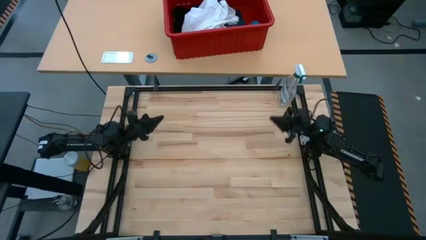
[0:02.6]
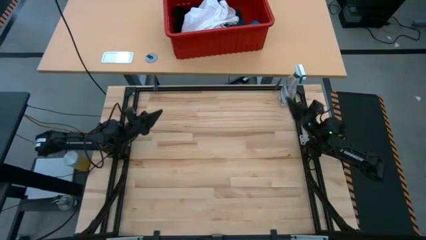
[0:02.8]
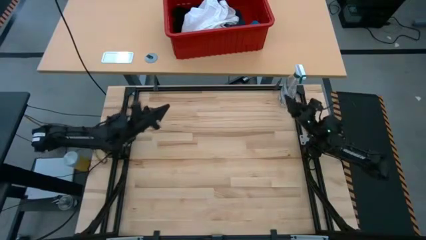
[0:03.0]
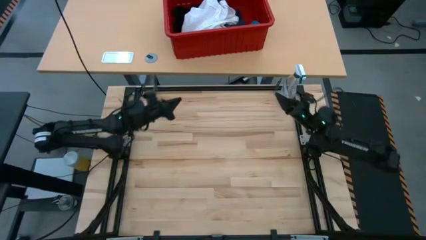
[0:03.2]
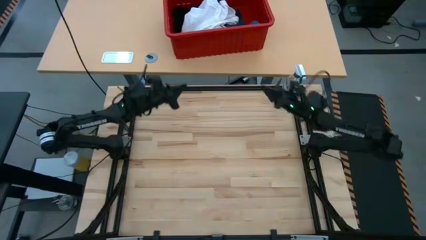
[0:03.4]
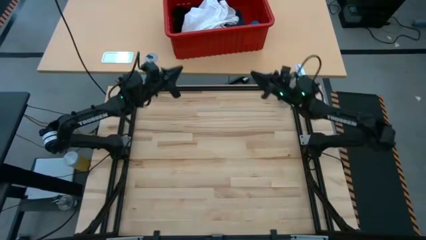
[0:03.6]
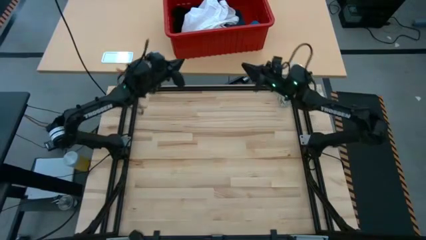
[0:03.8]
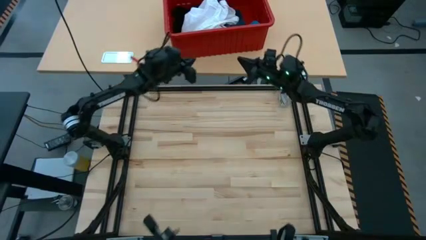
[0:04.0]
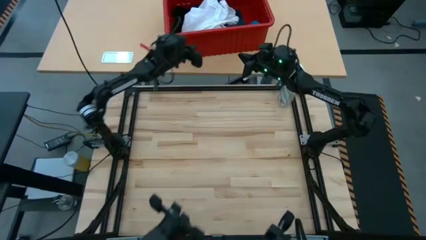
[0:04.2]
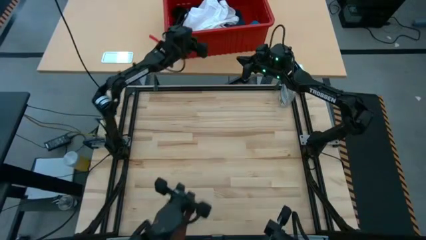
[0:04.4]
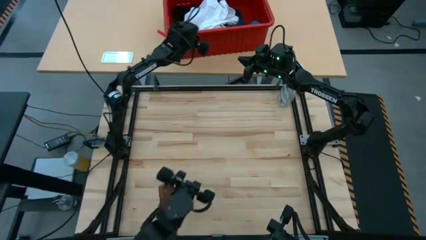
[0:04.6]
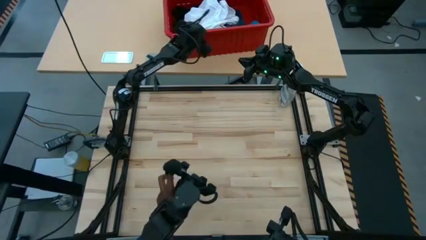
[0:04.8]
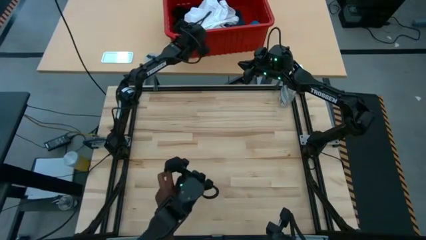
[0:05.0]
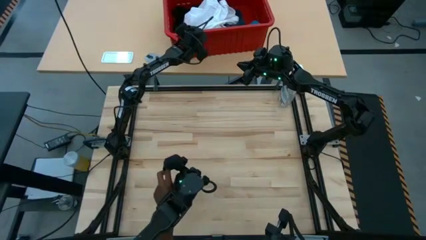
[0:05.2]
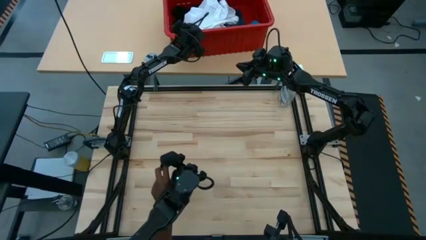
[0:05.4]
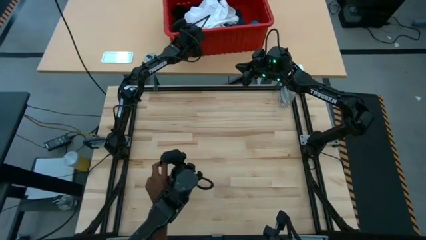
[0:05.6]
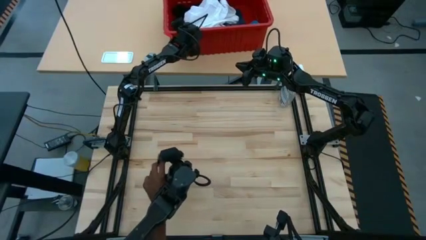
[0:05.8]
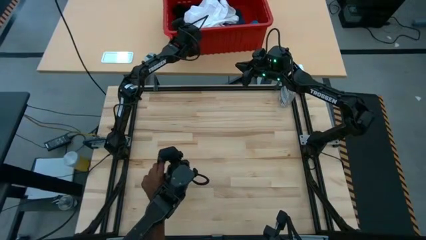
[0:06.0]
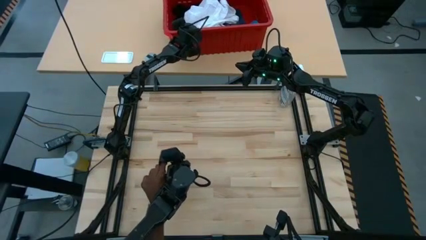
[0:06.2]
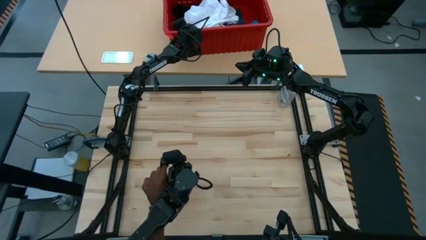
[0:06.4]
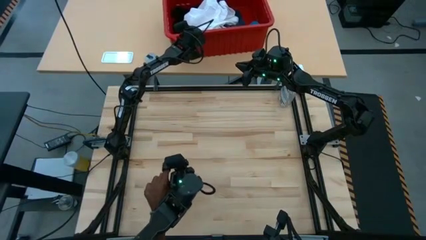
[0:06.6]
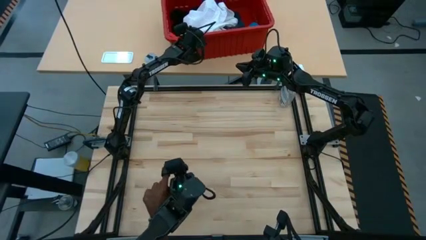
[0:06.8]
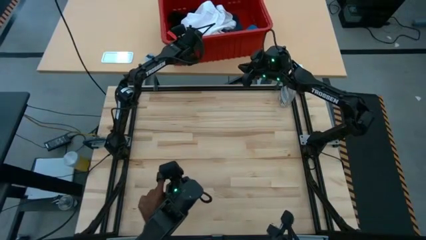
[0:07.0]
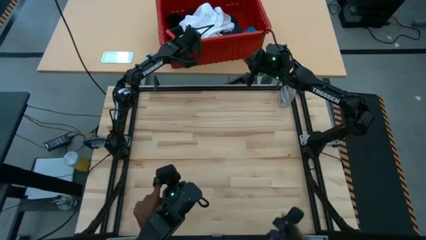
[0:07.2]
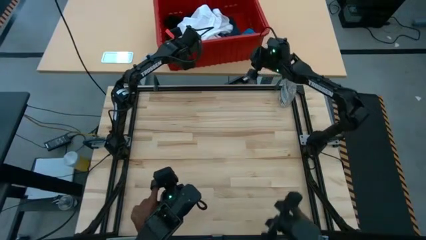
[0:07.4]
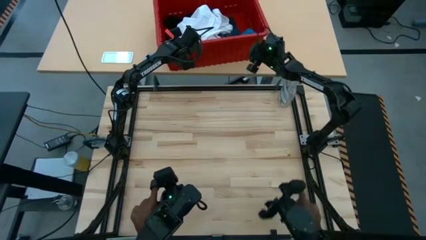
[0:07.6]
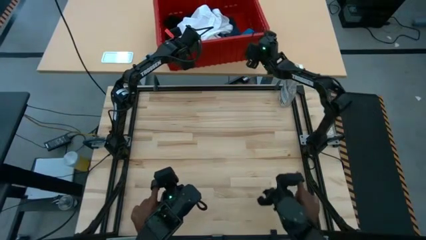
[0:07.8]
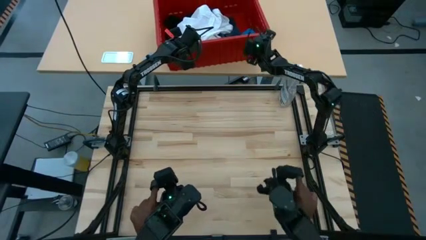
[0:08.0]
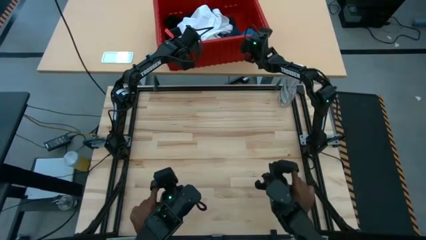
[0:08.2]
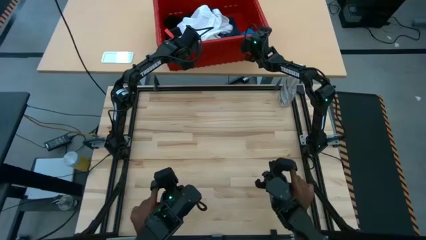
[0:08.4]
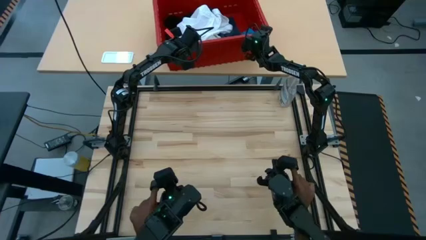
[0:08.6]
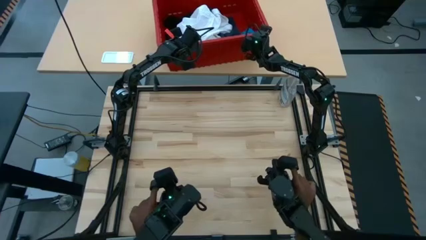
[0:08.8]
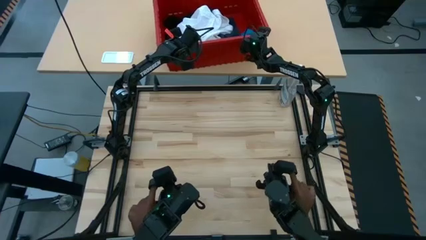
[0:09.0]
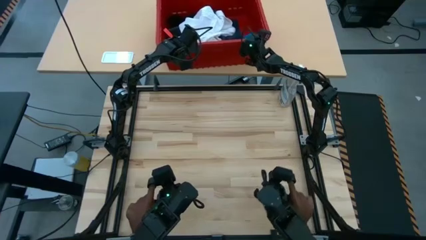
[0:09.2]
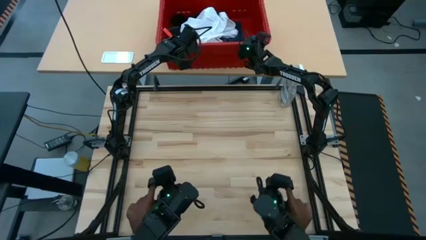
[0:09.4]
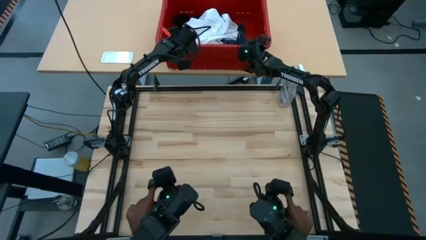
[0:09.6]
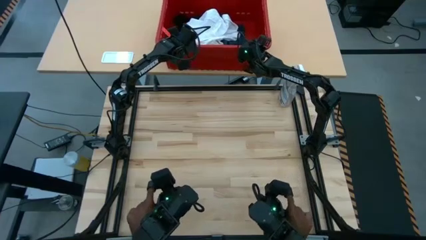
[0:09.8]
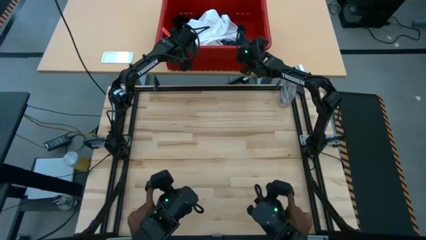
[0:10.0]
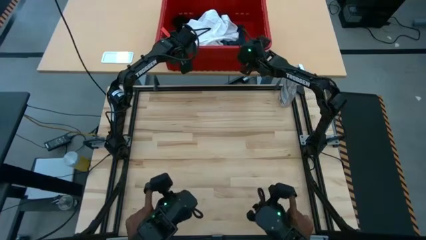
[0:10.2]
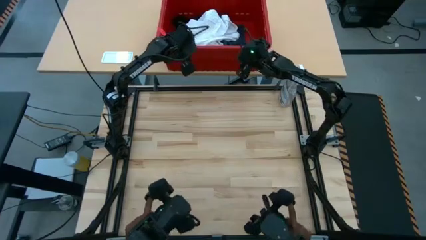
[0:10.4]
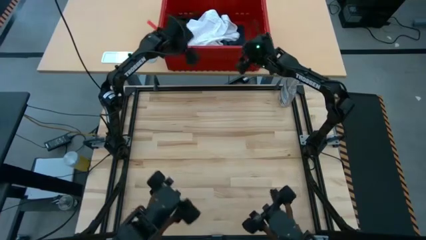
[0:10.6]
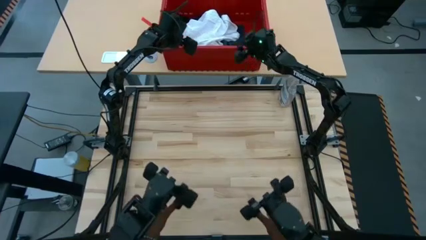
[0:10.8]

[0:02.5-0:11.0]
Task: Fold Laundry from Bin
Adjust the red bin on the other table

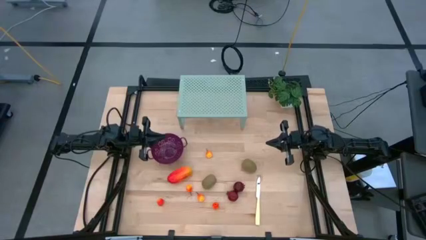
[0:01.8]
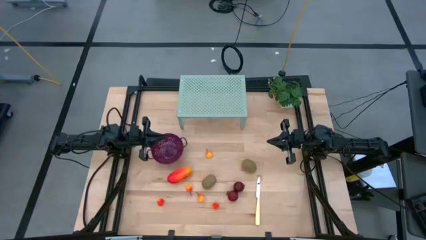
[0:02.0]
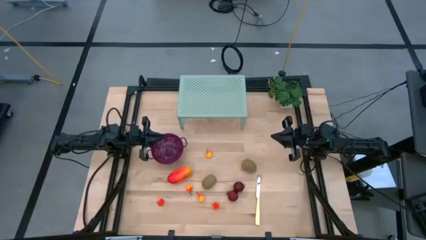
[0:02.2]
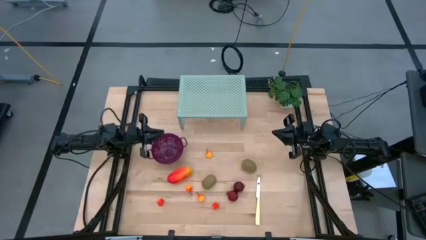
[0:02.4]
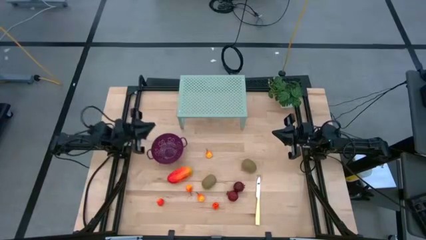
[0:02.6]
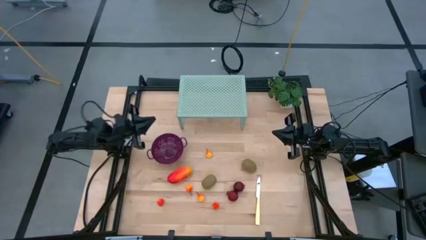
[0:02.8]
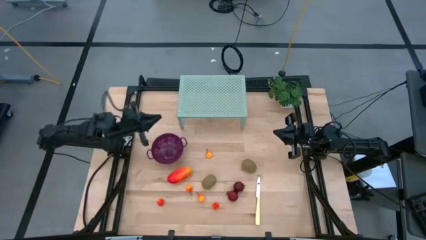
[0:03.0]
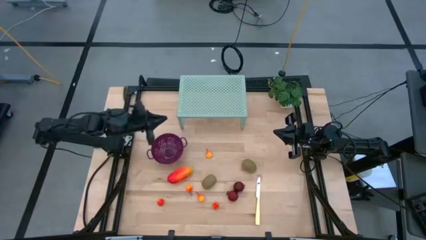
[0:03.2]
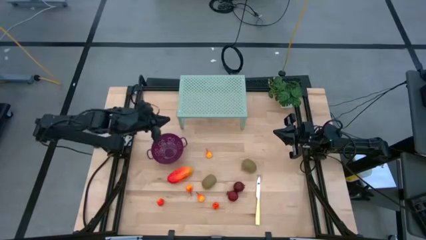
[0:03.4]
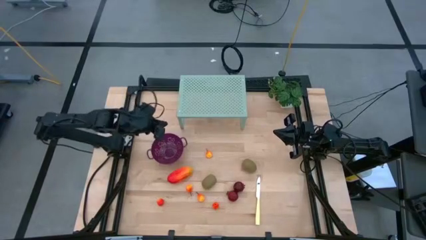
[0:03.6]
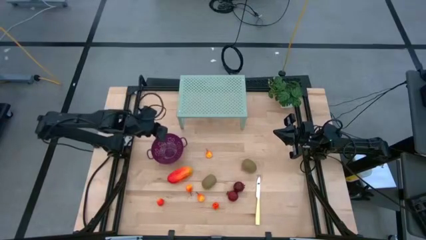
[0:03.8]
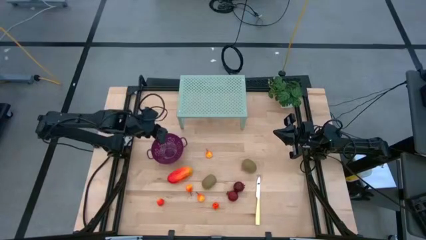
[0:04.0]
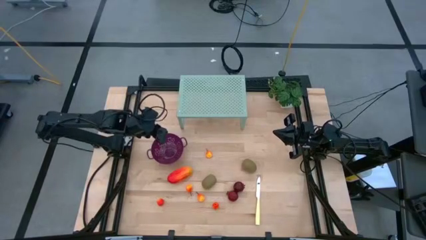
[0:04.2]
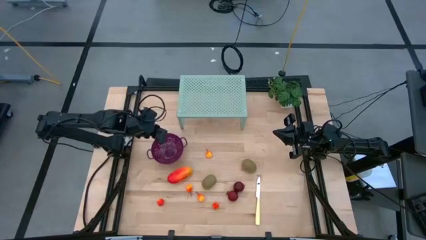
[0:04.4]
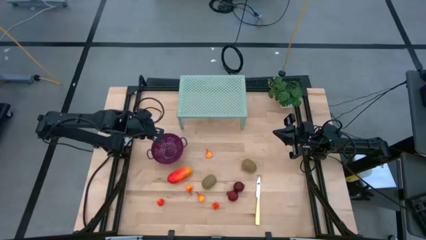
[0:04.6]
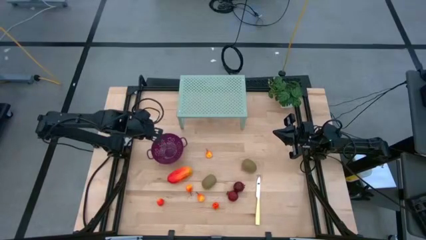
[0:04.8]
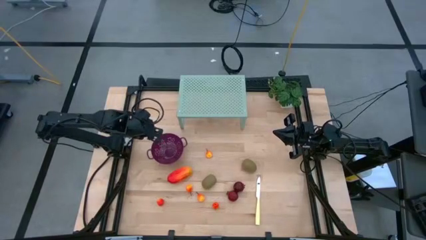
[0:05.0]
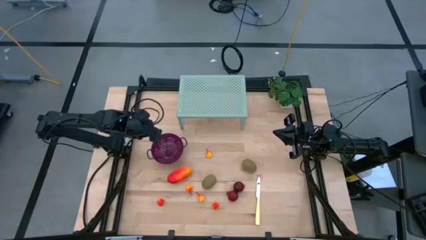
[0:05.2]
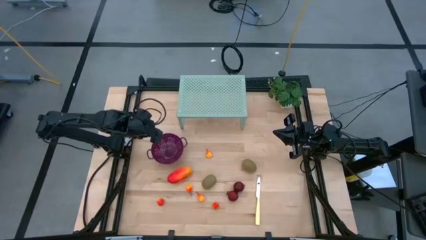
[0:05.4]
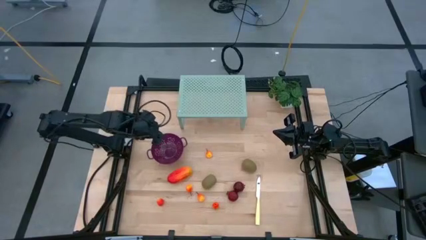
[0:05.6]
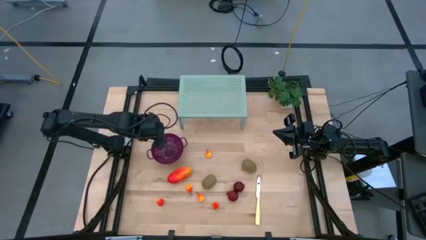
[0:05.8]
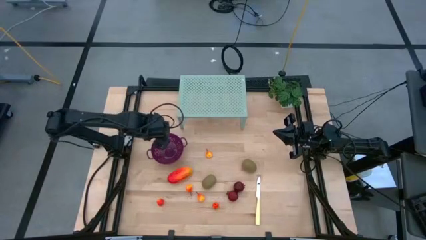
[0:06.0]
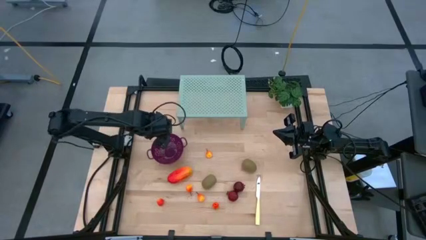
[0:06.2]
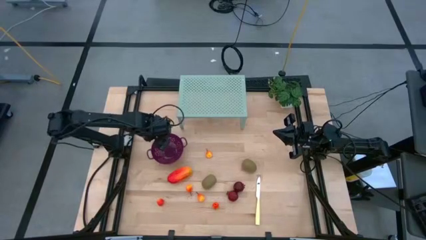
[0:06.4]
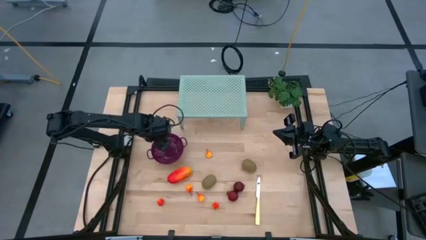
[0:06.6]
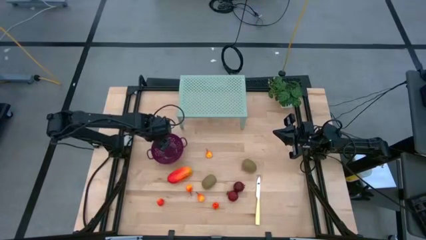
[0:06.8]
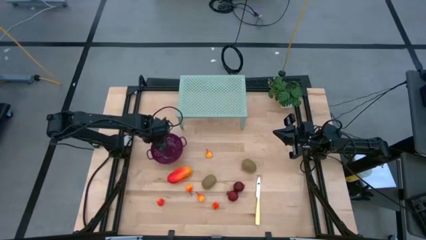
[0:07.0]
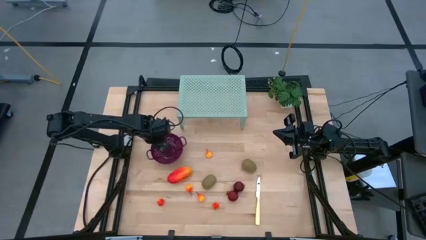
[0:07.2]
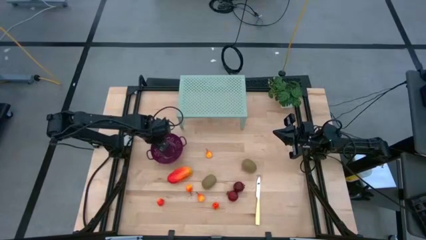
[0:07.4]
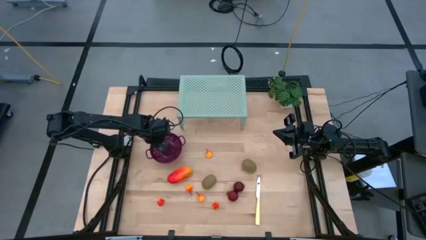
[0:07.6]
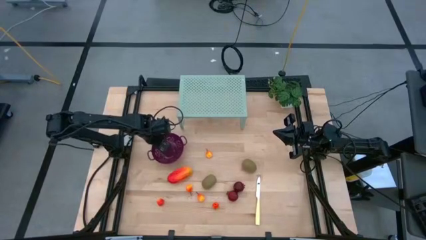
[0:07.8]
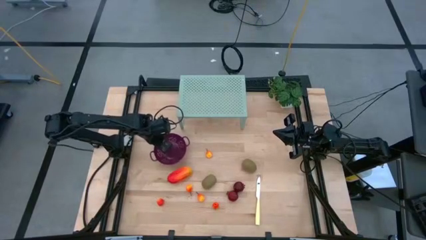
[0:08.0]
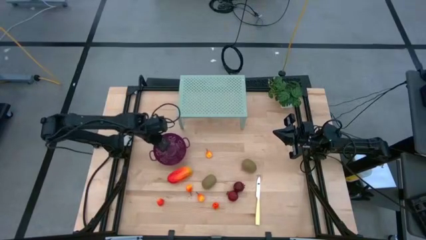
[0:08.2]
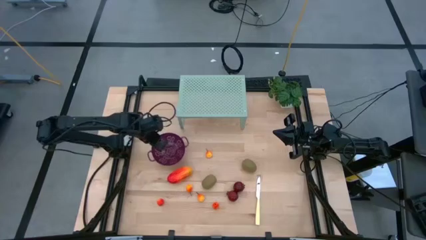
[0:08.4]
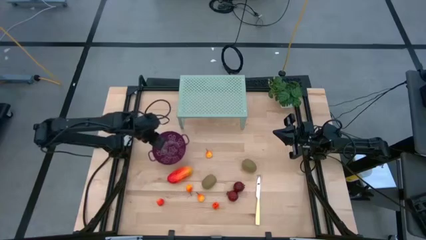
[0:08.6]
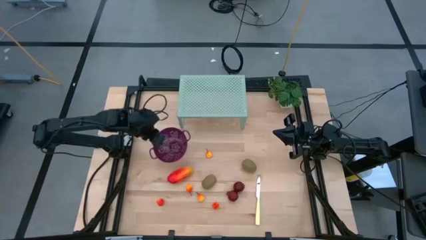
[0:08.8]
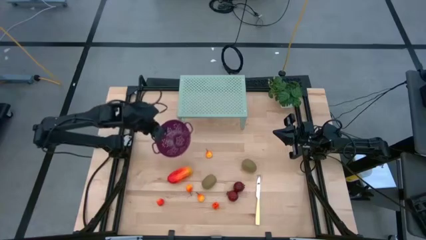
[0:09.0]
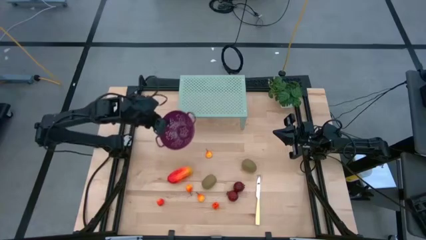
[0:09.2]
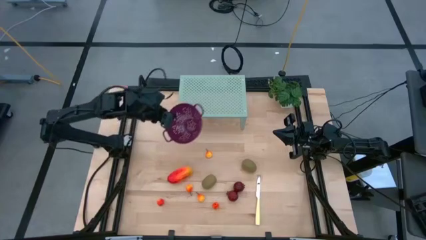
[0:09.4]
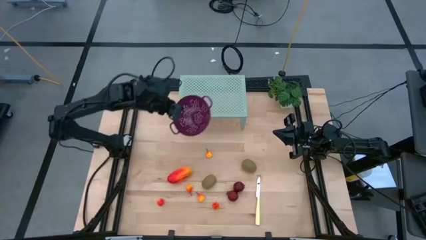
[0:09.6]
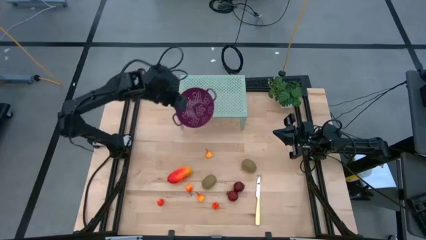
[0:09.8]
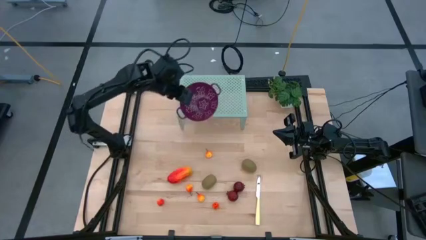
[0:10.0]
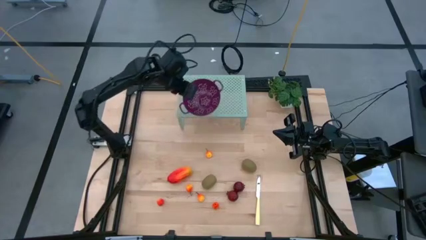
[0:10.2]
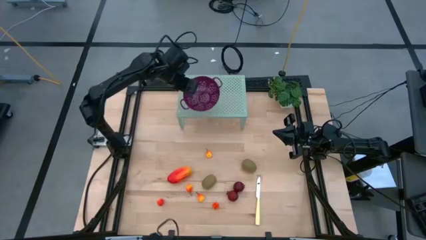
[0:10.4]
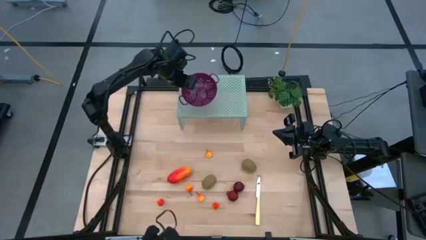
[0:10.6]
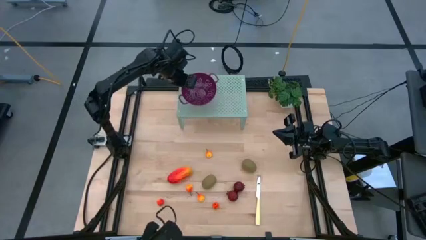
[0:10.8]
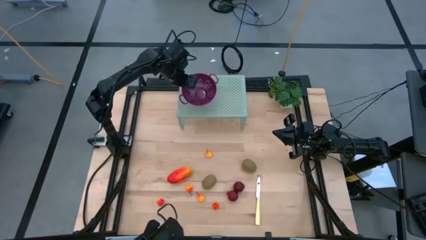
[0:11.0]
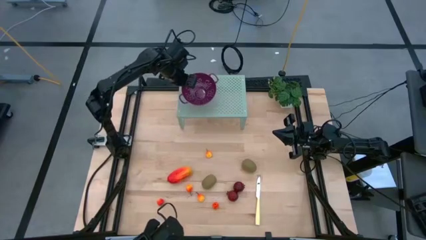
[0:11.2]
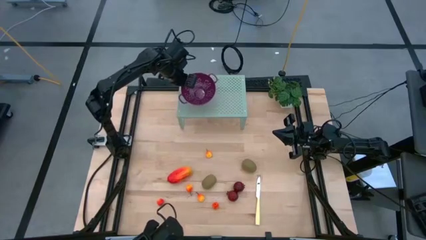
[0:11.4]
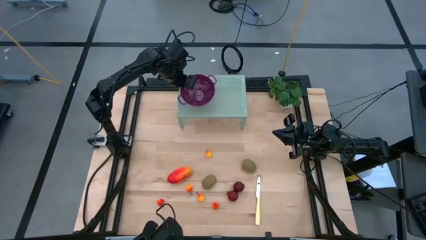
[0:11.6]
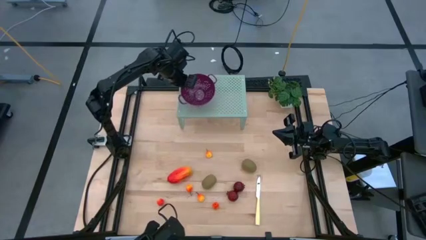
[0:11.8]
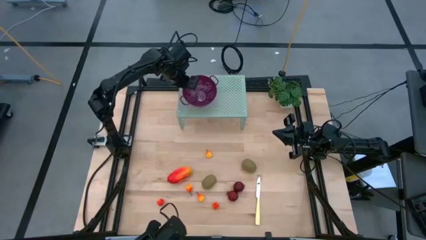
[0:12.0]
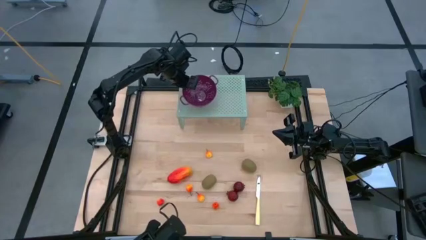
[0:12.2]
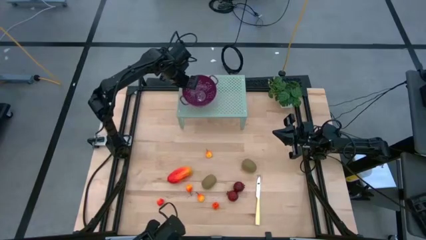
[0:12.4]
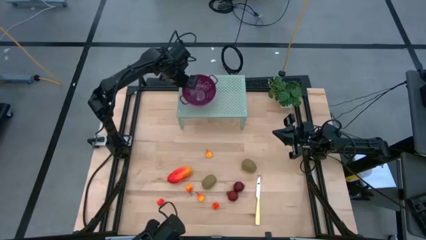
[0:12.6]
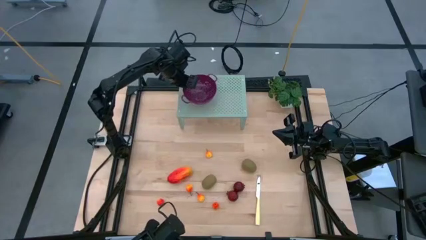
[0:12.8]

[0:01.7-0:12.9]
Task: Pick & Place Fruit
Put the red strainer bowl on the shelf
